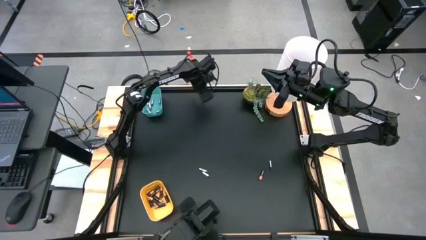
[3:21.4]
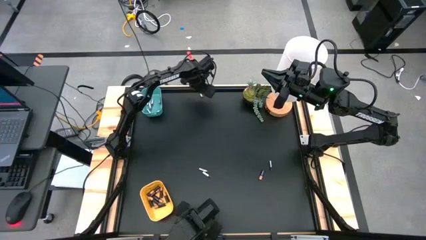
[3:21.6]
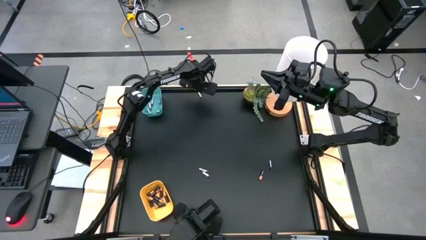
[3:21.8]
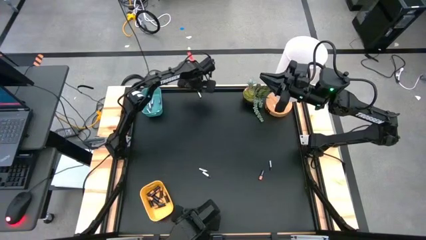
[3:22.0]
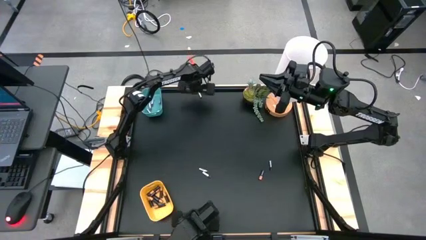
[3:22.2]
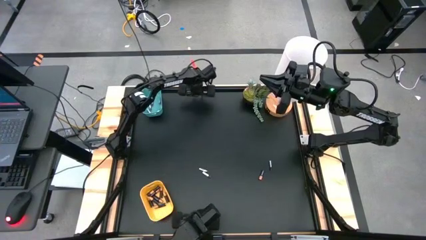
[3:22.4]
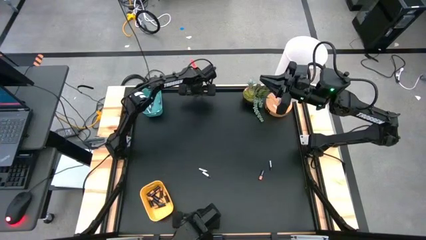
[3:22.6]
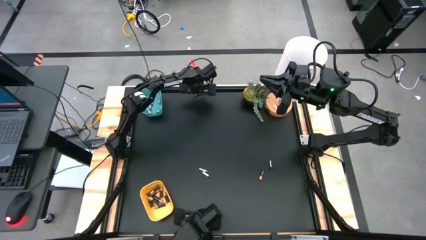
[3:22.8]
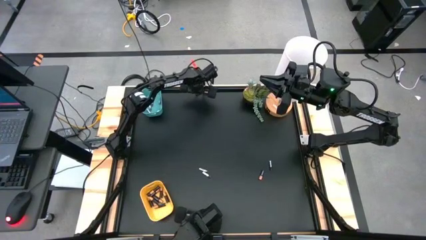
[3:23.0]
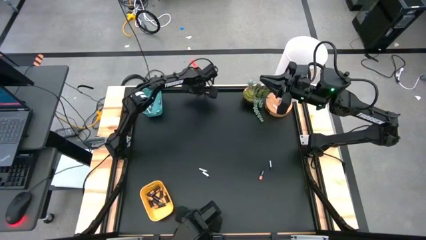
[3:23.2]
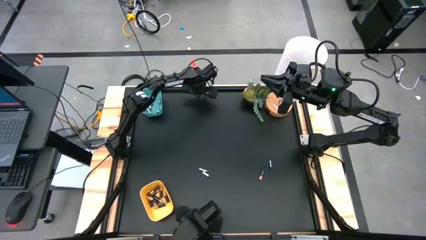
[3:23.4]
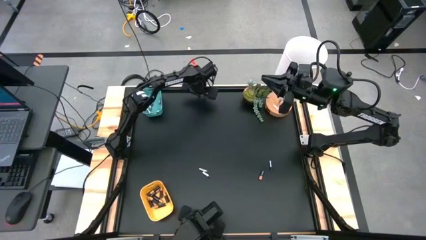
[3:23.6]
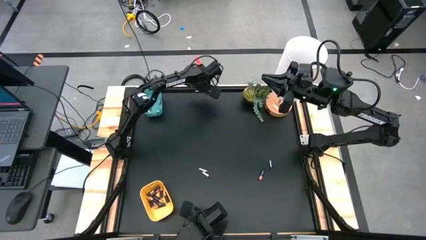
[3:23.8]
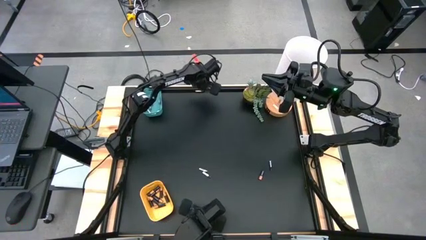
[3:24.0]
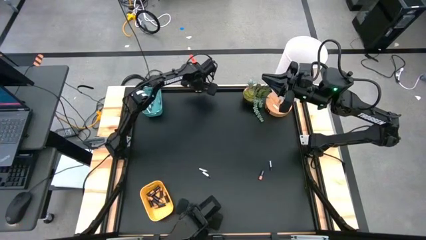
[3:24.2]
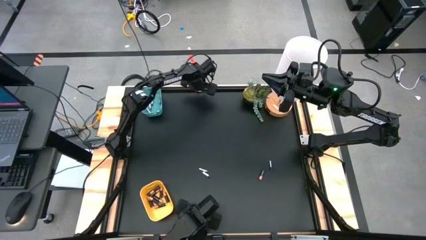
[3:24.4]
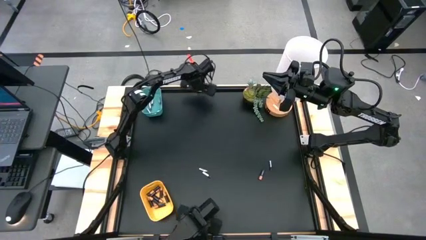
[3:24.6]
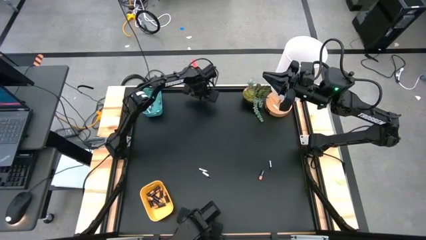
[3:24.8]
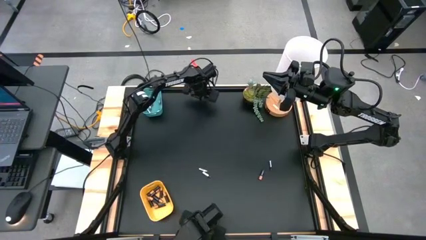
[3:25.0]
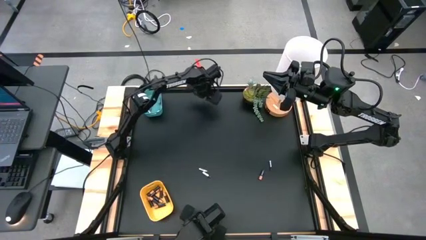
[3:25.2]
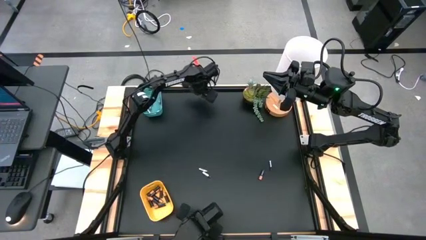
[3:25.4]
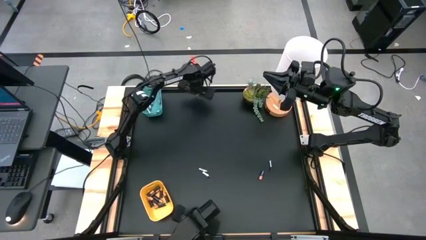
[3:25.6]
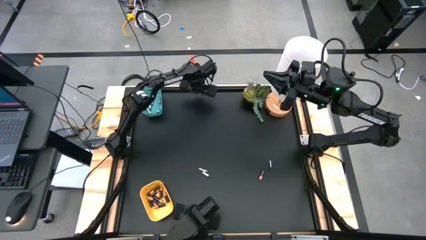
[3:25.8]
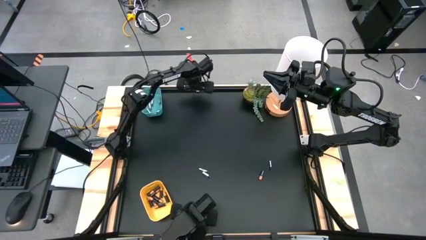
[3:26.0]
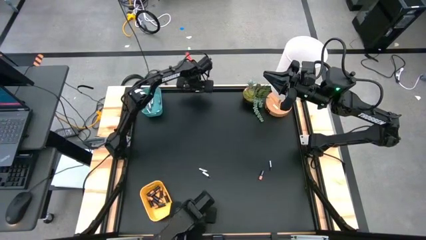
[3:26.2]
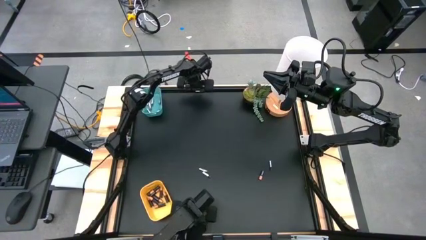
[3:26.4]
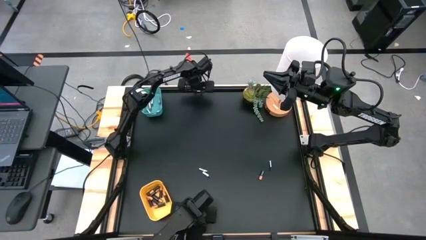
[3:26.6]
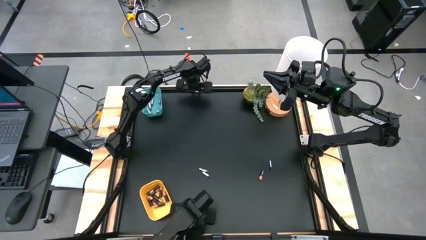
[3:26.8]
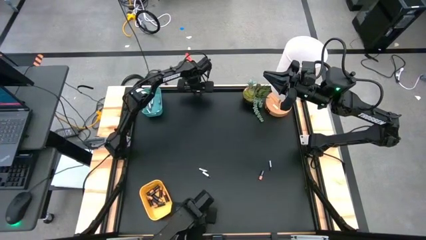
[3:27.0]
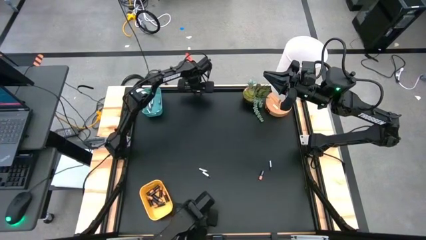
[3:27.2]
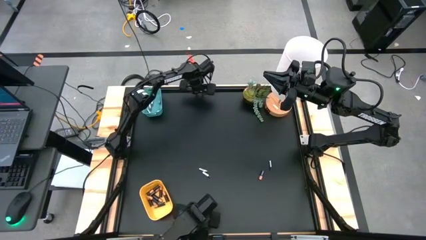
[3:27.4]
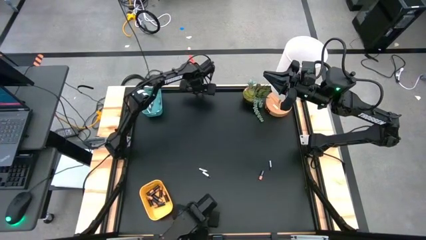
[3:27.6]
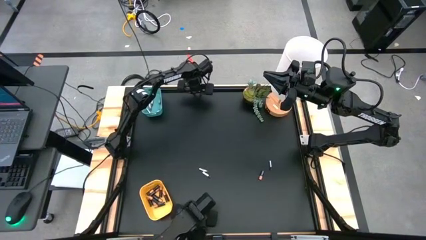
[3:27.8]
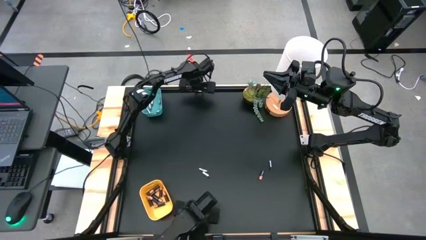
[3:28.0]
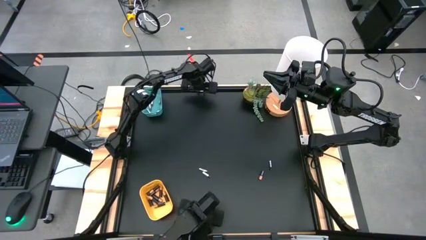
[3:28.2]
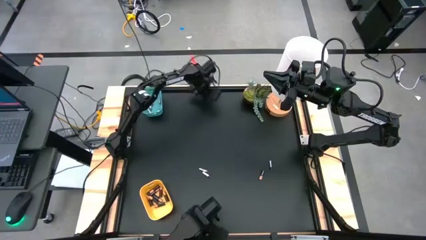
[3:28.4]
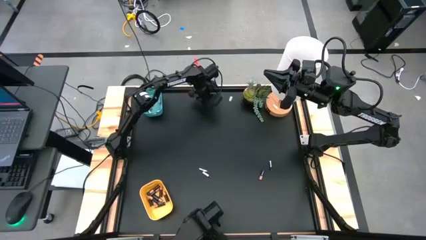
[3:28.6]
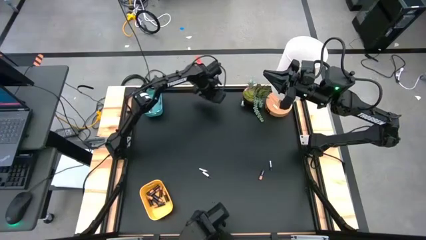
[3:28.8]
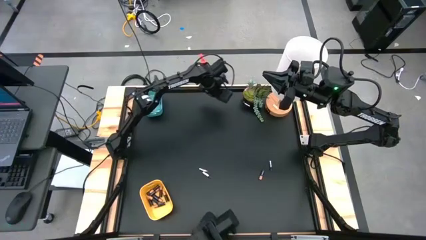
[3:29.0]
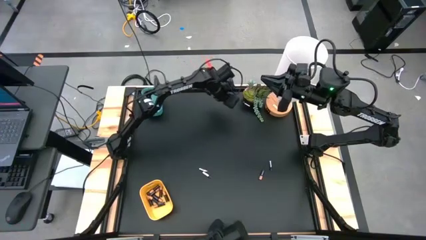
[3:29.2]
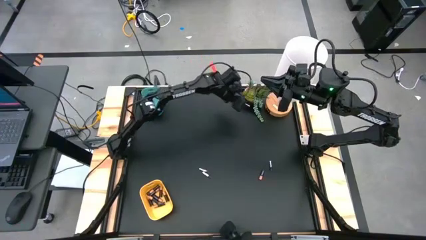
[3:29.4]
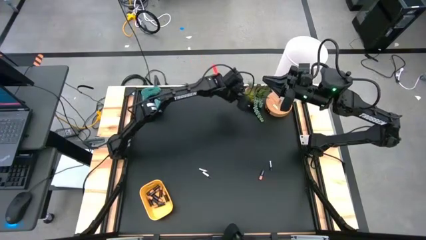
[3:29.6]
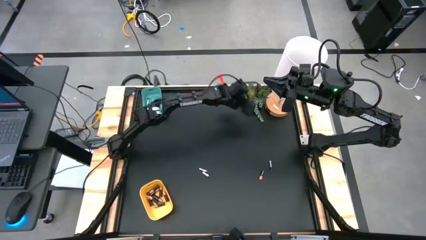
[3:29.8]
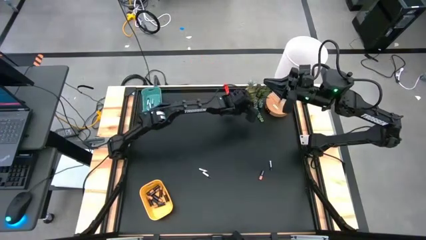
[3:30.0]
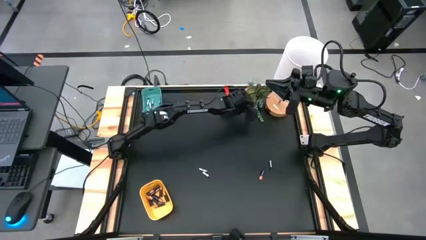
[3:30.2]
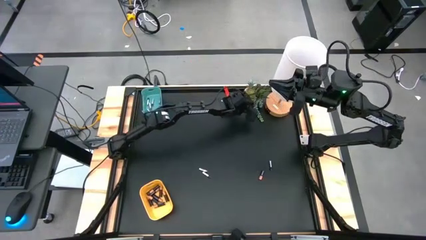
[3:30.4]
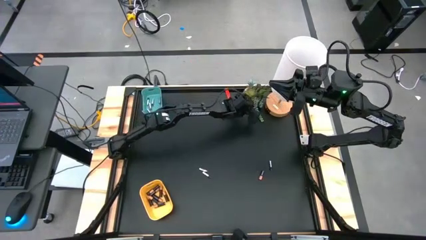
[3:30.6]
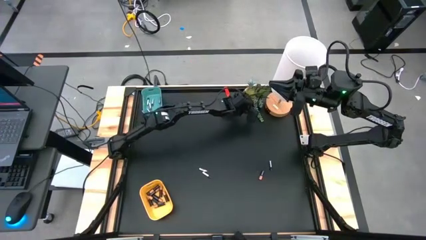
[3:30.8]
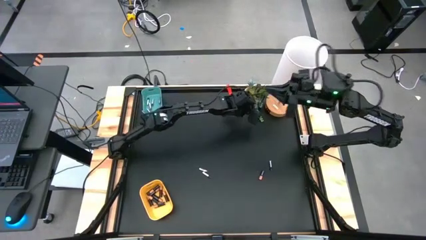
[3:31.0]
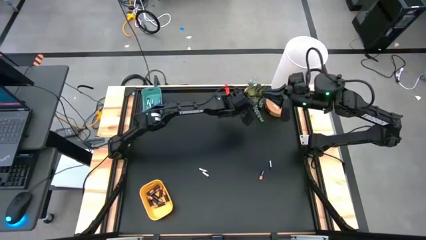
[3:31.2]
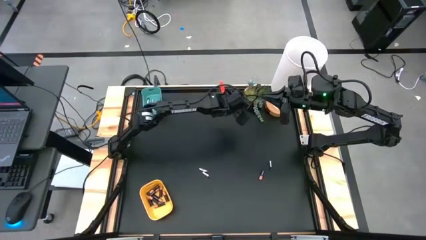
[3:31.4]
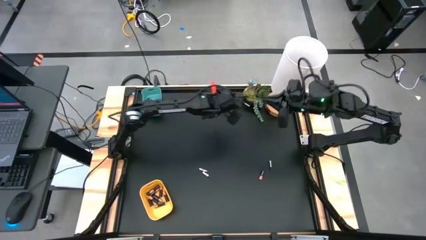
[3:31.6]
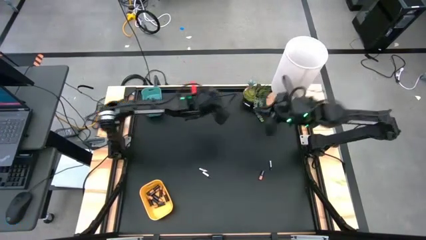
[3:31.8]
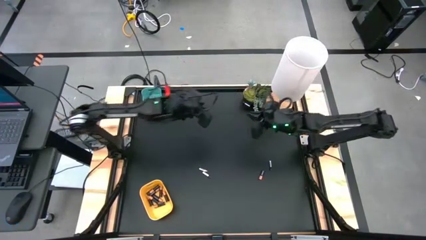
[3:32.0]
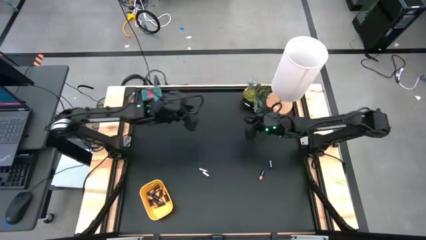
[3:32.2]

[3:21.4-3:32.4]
Task: Sort batteries
Put the silver battery into the blue bin

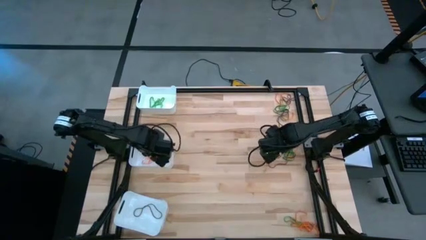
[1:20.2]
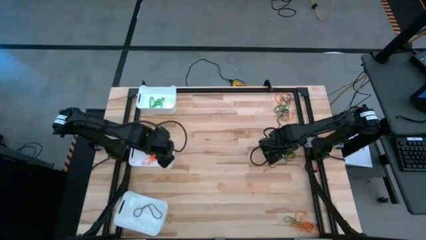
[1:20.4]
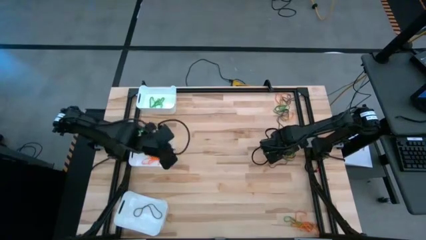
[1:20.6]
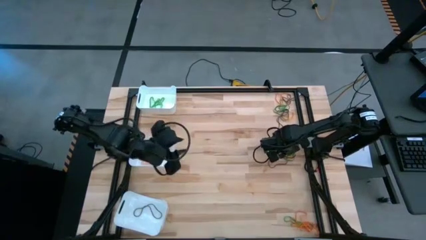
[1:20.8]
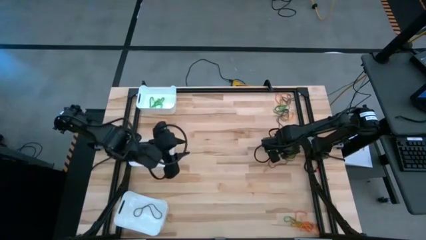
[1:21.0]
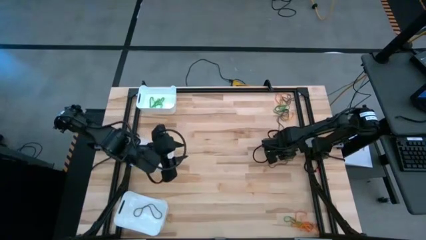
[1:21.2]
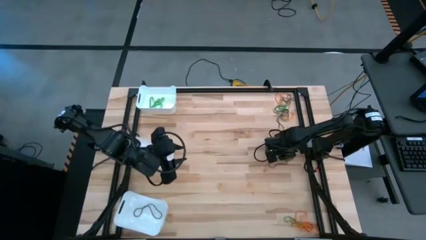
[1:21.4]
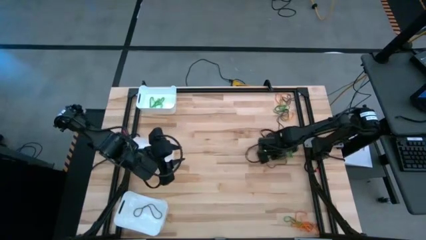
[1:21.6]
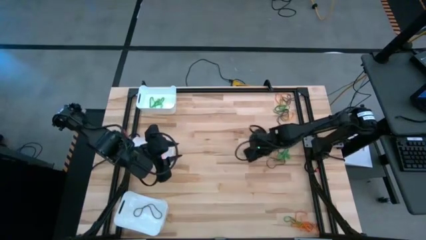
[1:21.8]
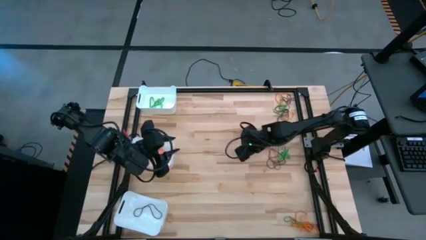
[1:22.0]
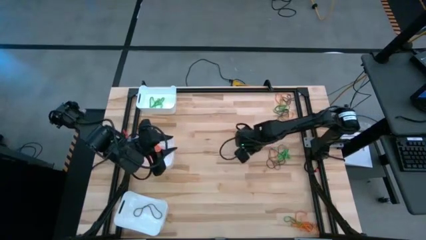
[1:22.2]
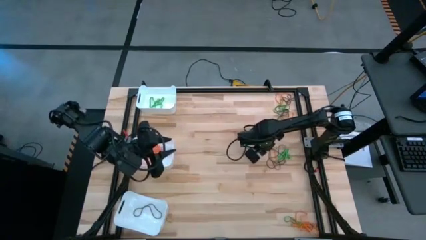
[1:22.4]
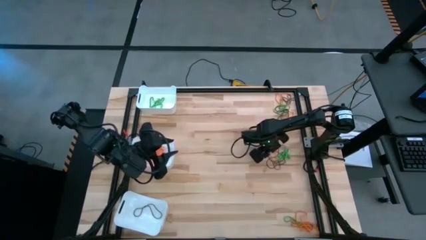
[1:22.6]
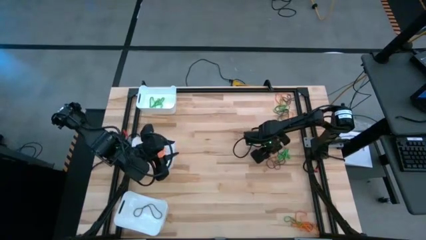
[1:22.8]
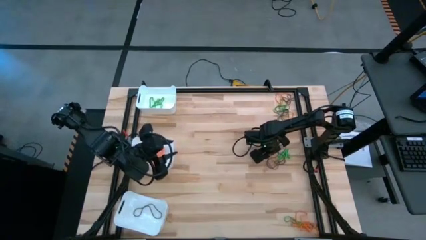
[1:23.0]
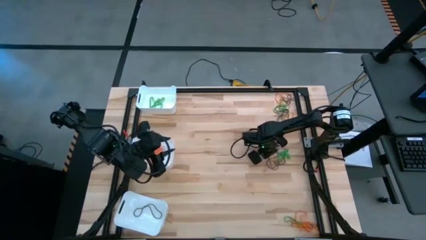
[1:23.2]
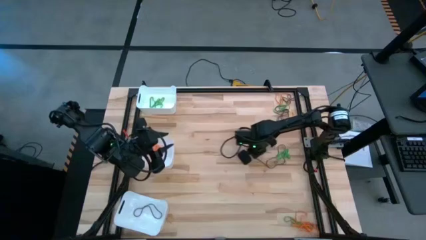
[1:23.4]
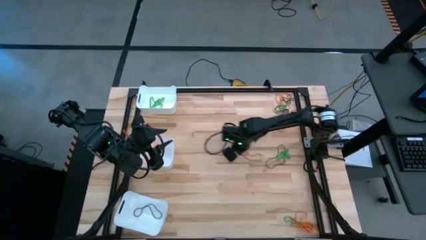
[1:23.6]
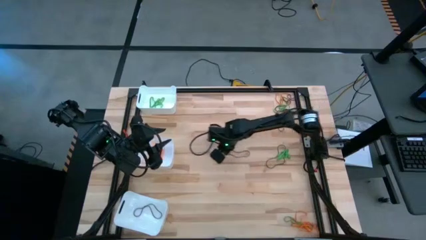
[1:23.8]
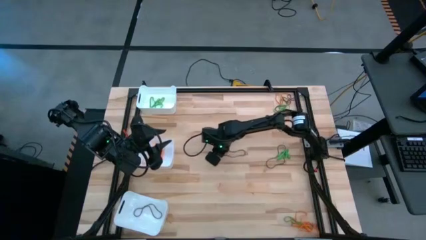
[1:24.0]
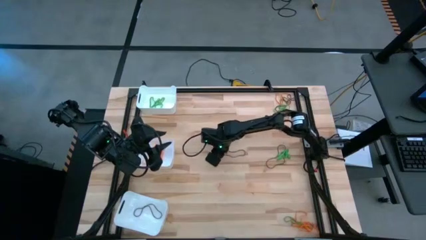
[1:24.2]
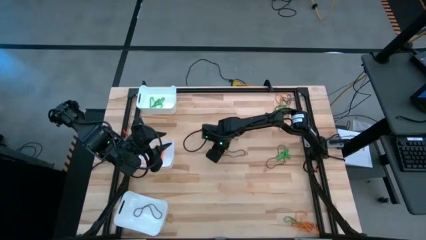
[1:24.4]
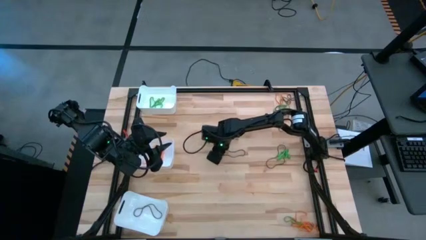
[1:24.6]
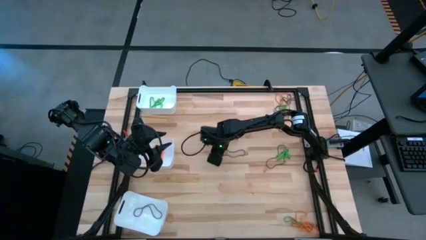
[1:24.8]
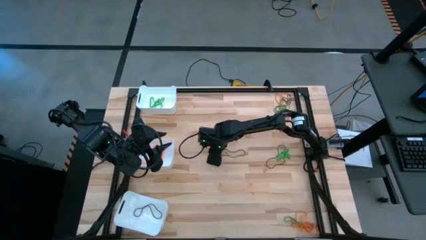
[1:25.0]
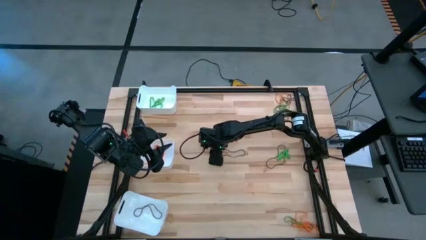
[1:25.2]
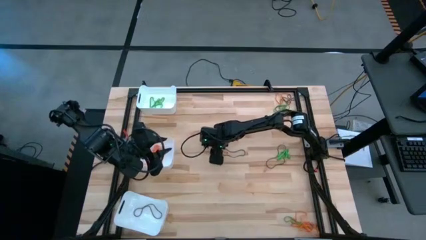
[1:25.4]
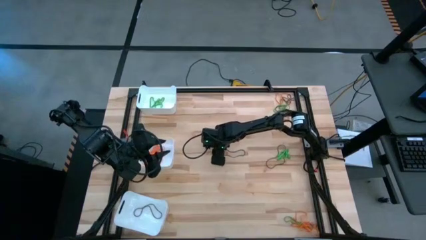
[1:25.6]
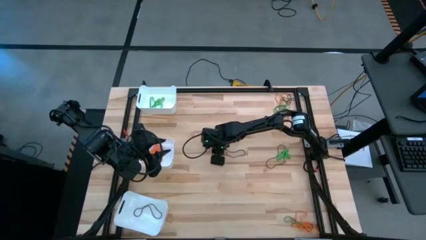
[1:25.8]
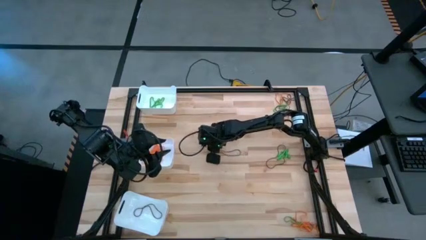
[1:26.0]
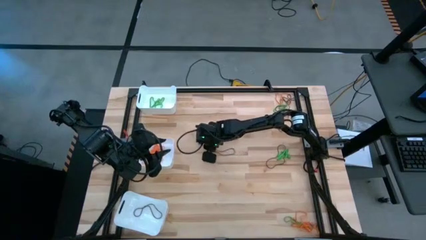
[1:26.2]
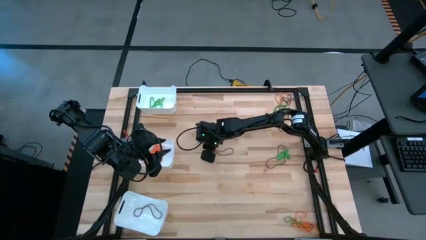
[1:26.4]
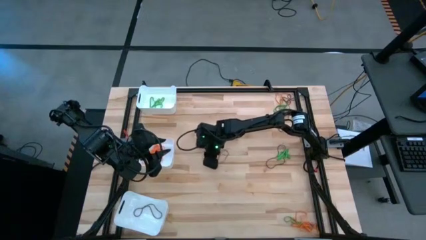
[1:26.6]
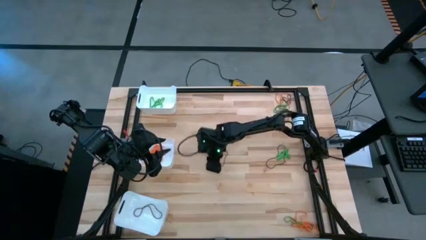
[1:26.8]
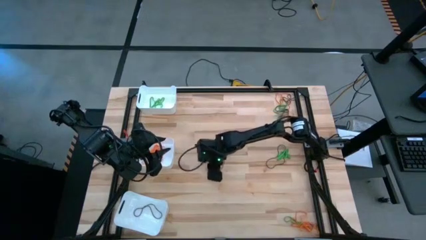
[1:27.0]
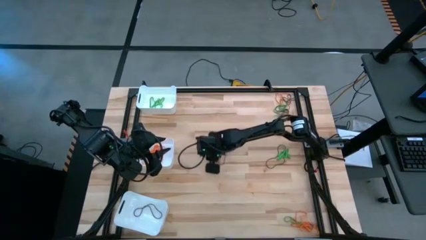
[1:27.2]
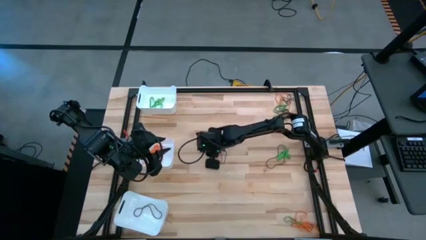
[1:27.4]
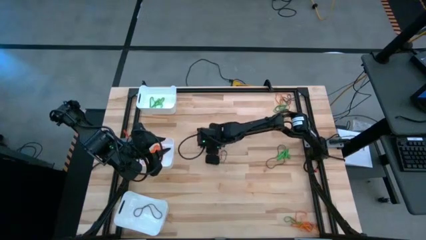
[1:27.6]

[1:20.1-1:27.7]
Task: Sort rubber bands into baskets
Put the black rubber band into bottom the white bin
